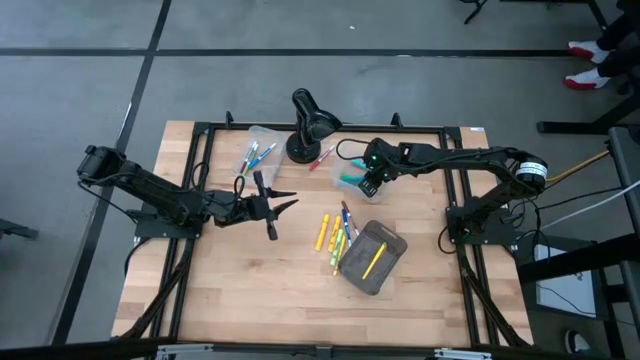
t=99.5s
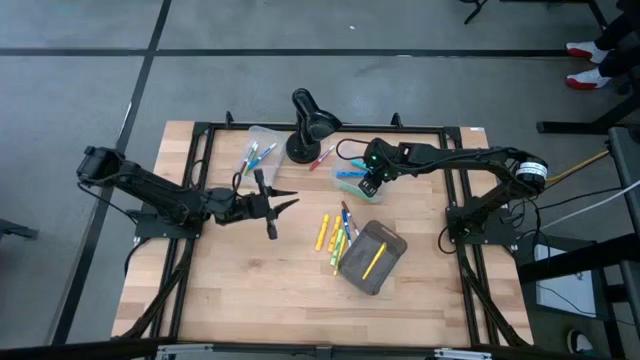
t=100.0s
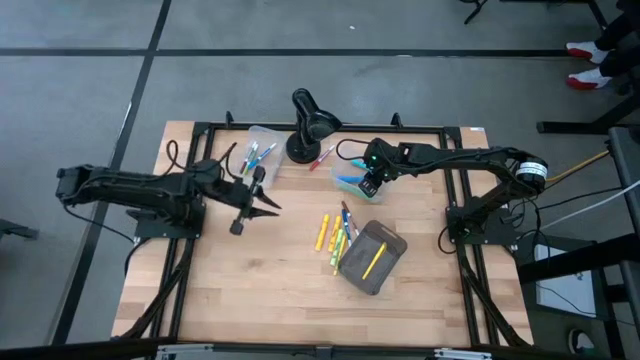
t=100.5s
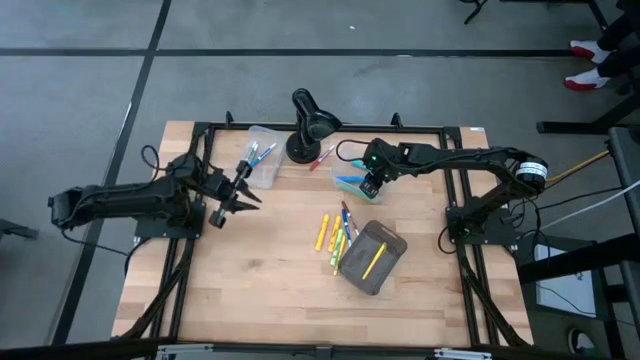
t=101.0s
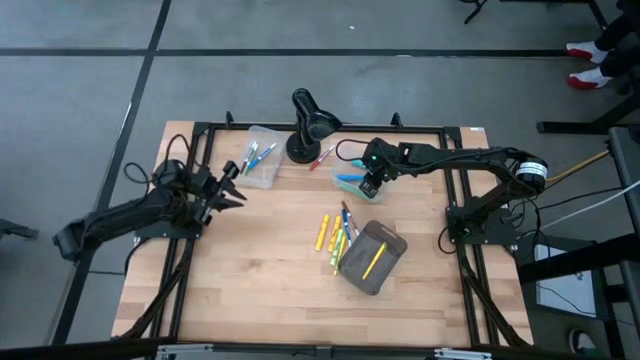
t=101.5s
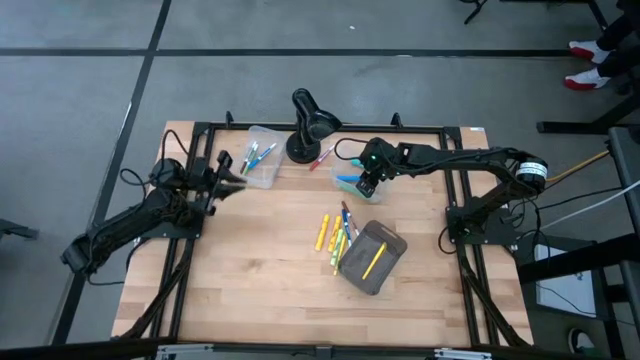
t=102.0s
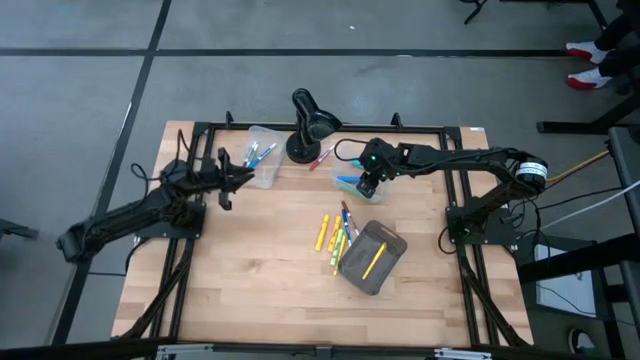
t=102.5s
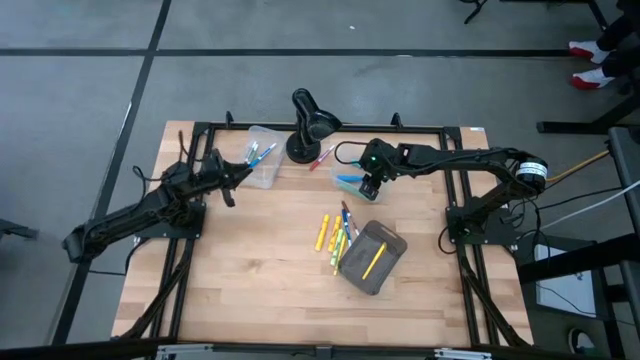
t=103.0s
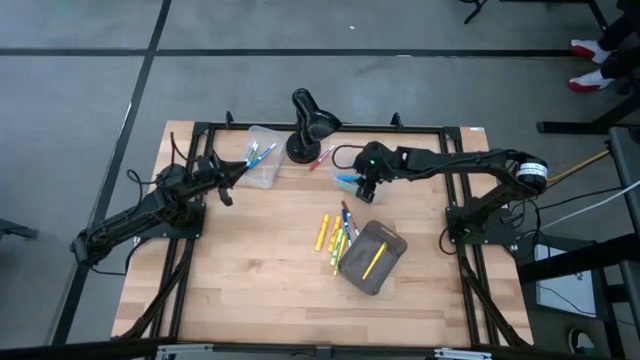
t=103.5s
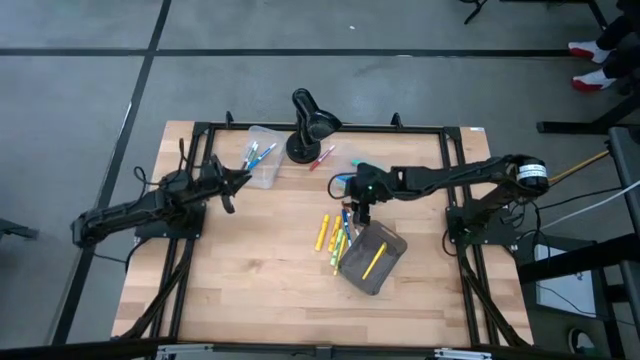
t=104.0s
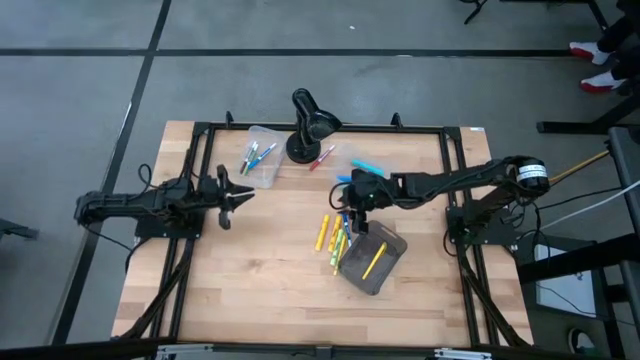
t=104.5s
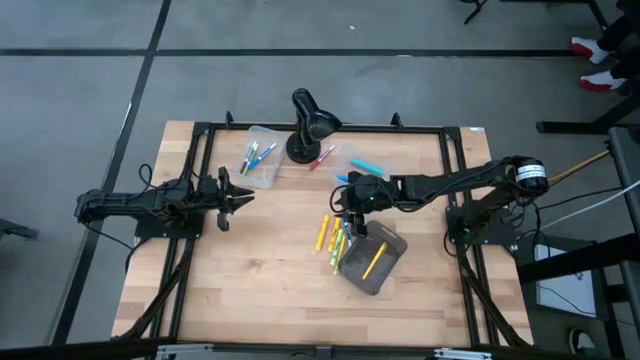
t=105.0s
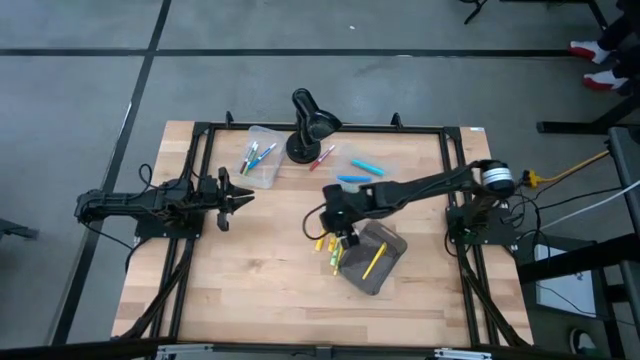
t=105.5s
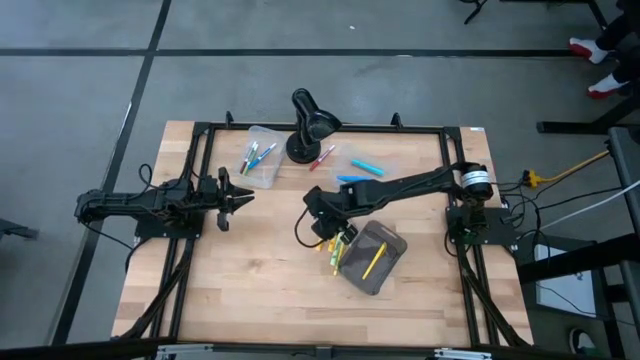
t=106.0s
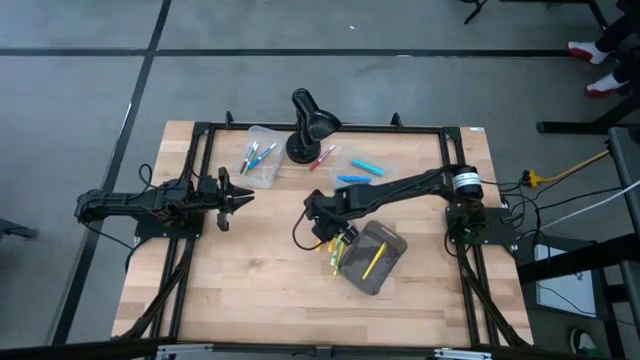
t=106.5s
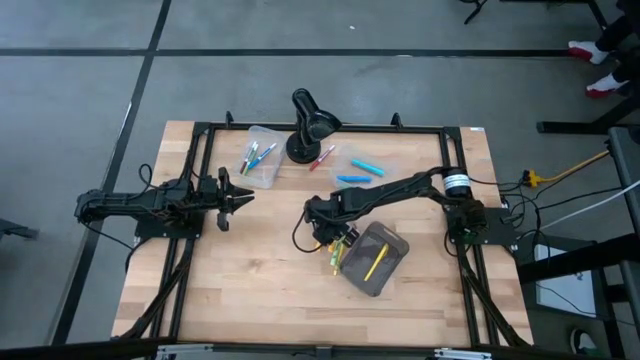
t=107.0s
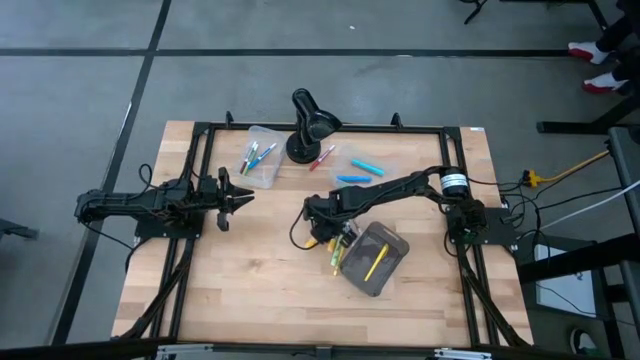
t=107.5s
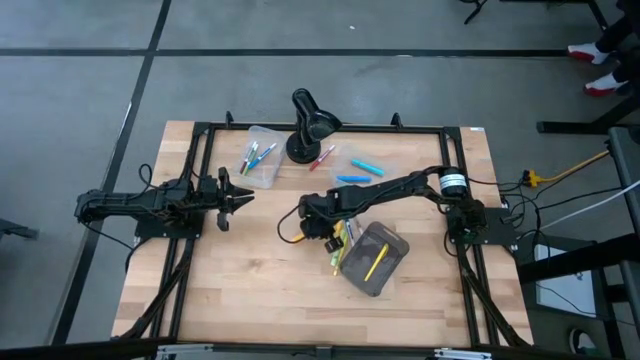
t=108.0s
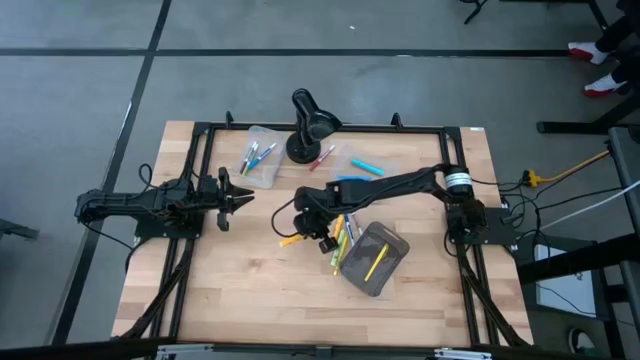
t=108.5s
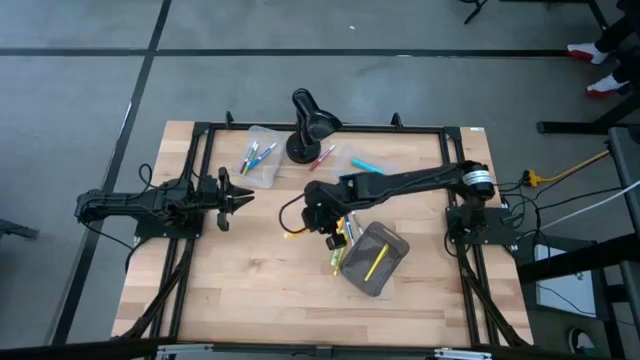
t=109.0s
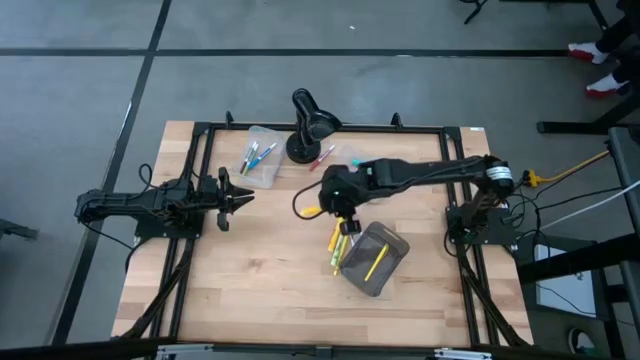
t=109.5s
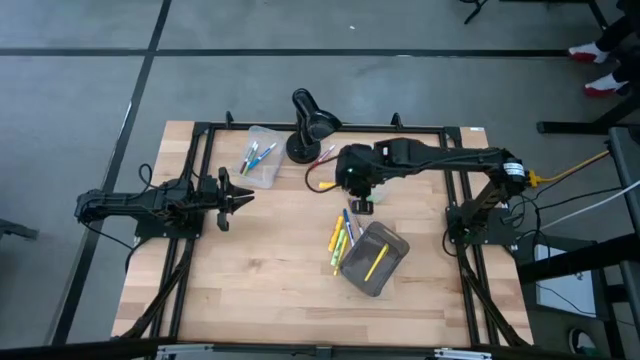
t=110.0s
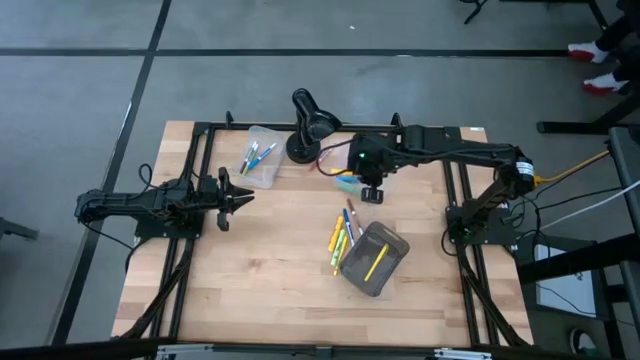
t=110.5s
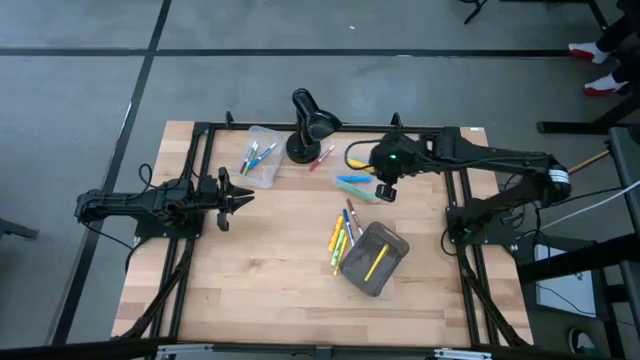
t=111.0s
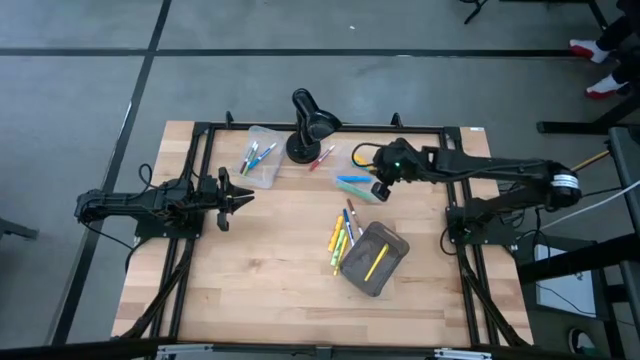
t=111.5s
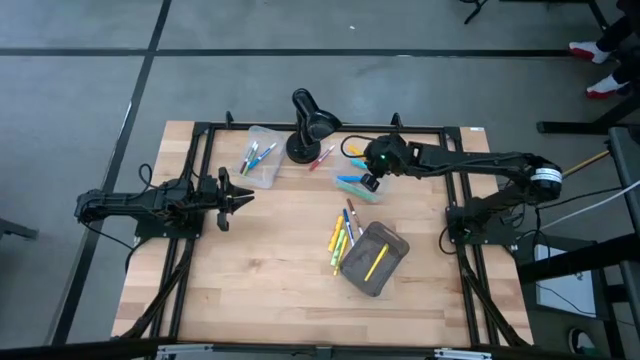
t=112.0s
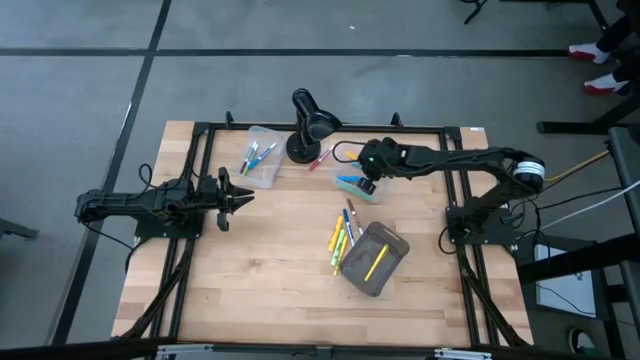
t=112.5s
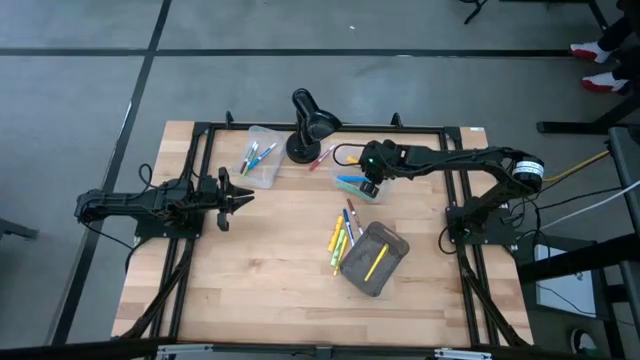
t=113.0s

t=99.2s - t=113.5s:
Task: Pick & Place Markers
Put the left yellow highlighter pen into the right transparent bin

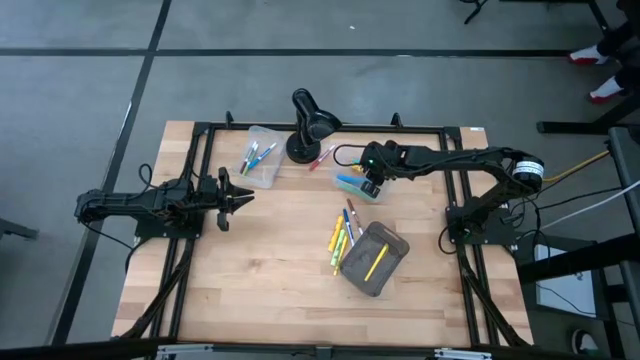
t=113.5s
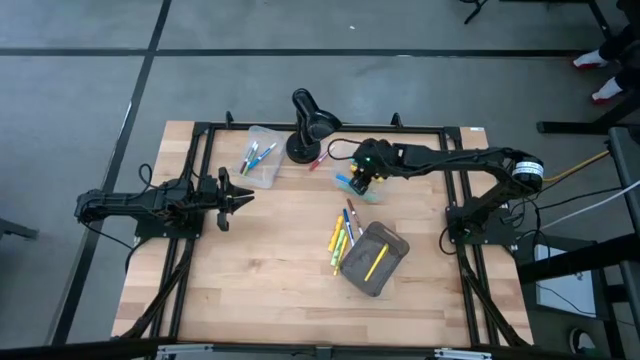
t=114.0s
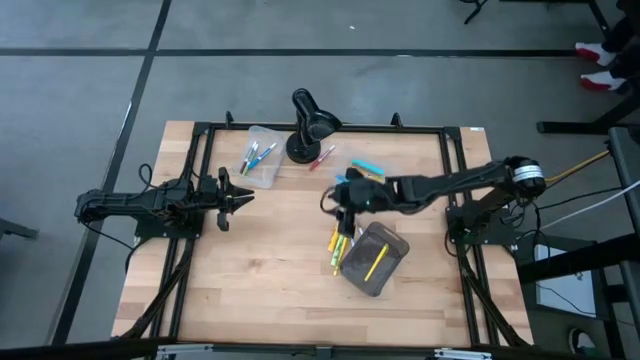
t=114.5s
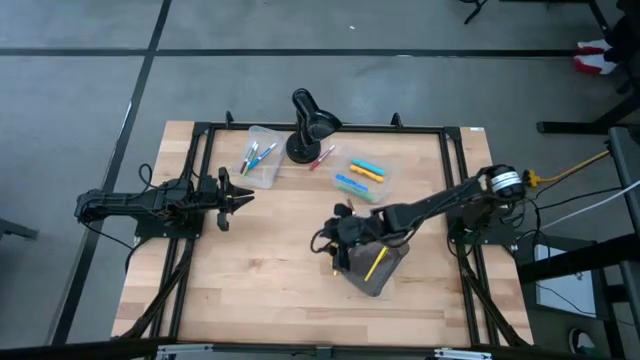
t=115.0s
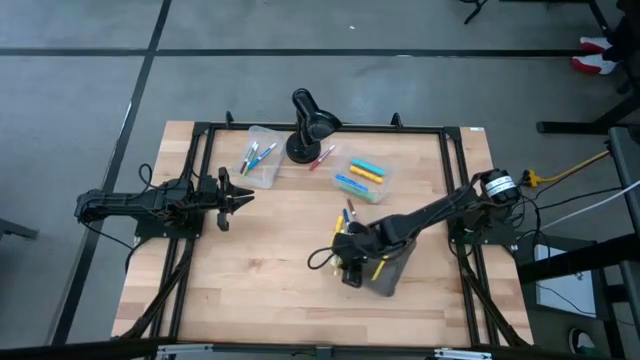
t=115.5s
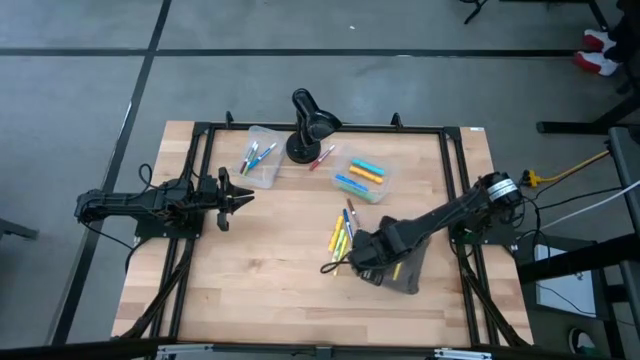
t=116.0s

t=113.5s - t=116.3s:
Adjust the black bin

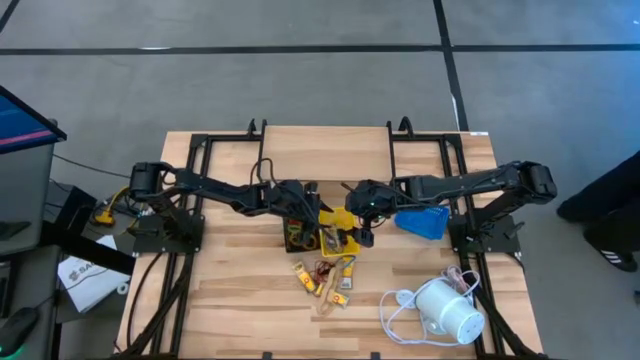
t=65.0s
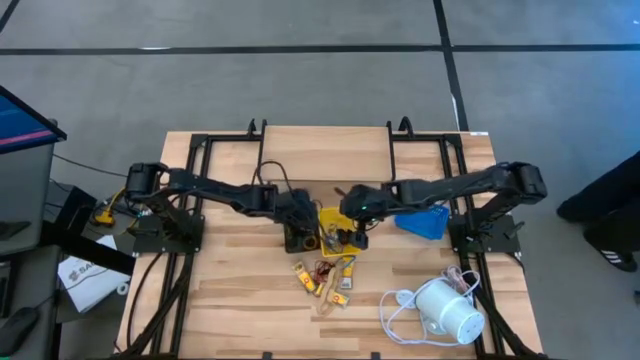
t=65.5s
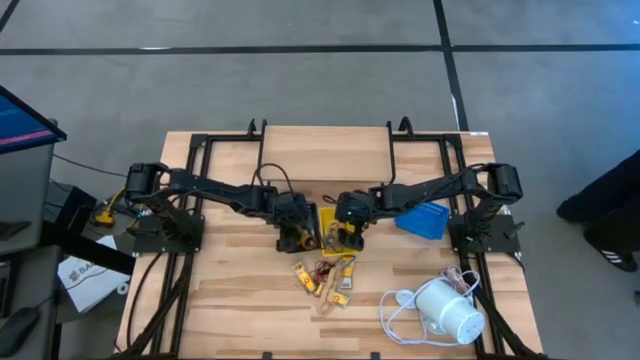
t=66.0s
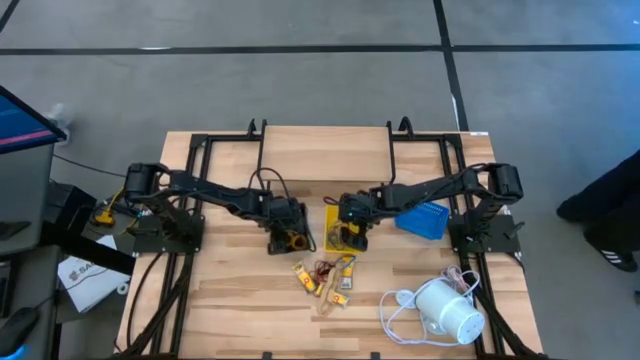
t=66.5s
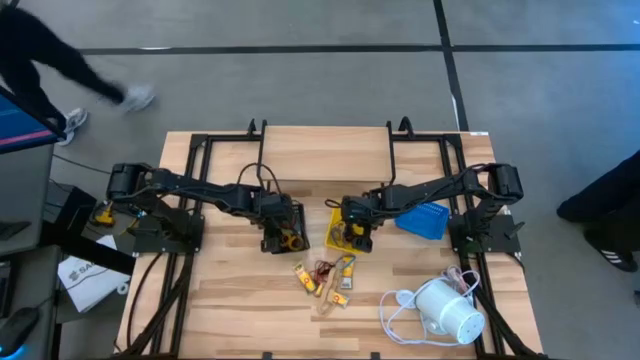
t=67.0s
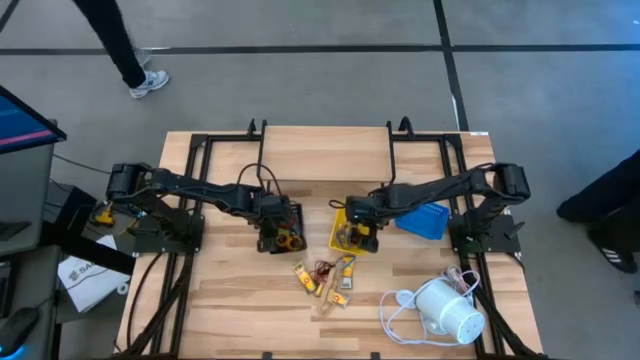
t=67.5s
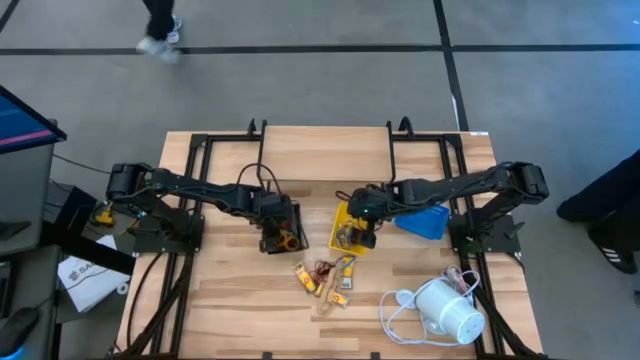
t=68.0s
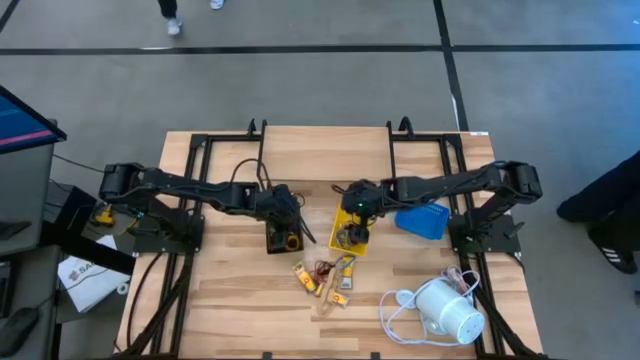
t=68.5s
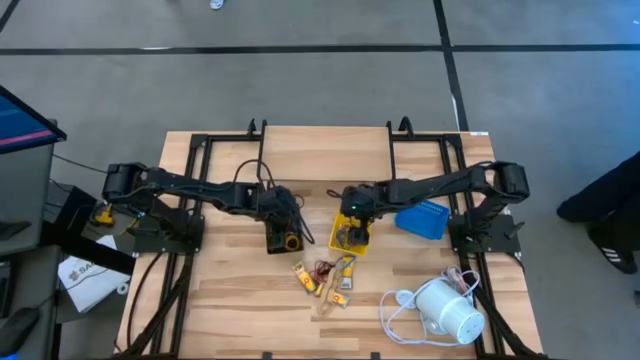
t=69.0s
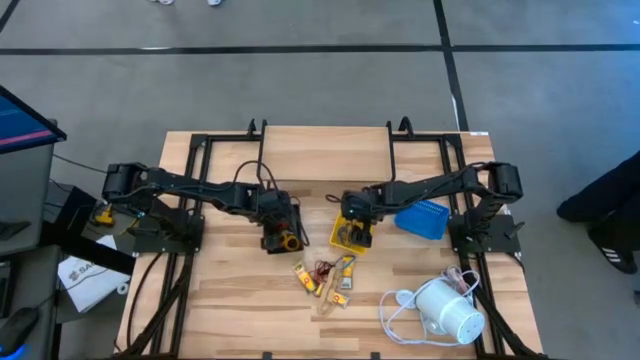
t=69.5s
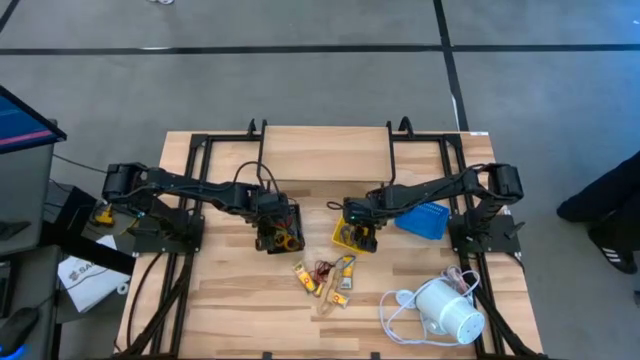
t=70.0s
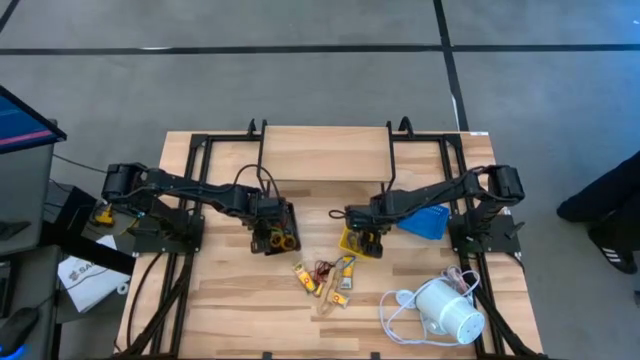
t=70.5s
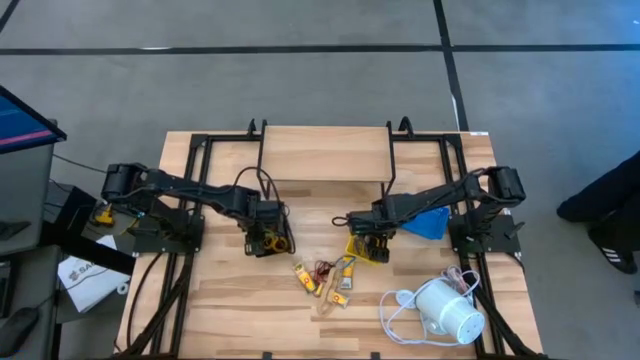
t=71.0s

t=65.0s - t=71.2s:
Task: Pick & Place Office Desk Supplies
Adjust the bins
